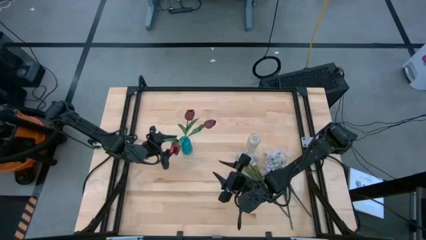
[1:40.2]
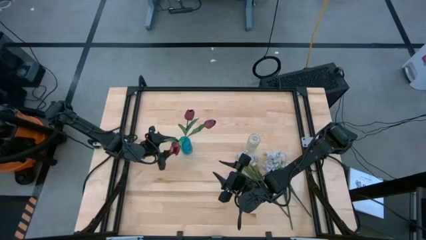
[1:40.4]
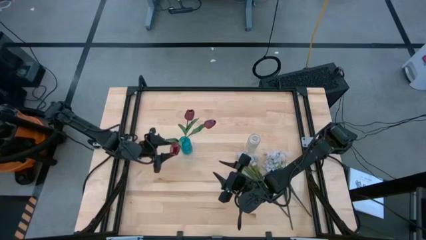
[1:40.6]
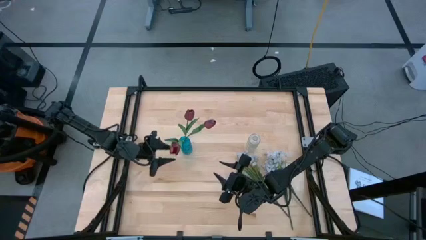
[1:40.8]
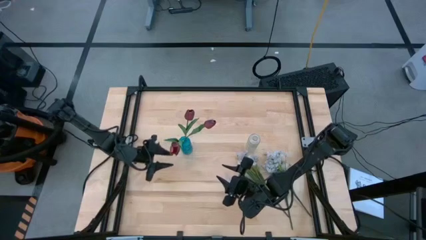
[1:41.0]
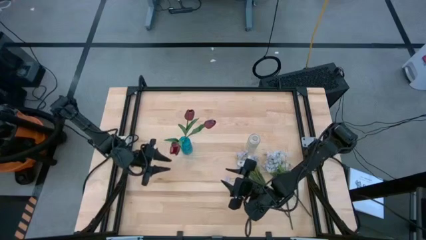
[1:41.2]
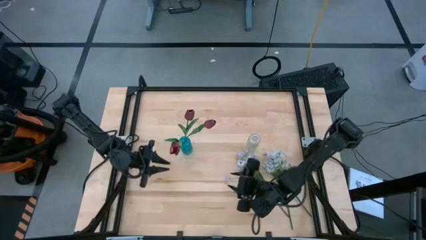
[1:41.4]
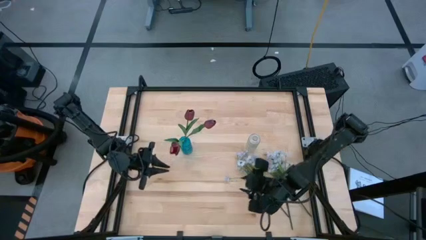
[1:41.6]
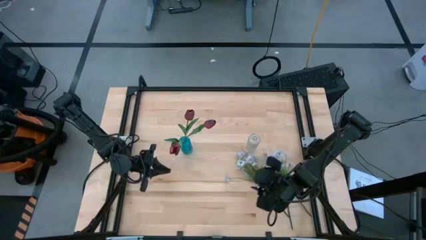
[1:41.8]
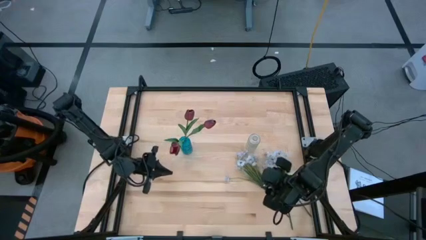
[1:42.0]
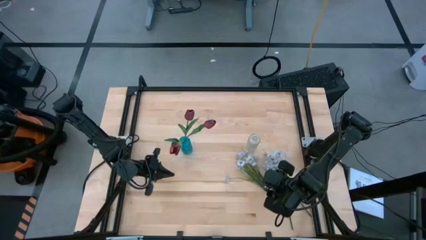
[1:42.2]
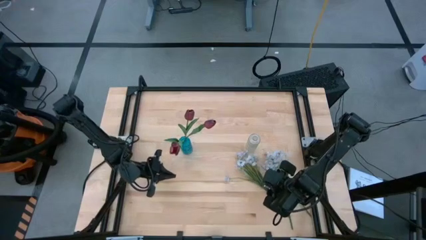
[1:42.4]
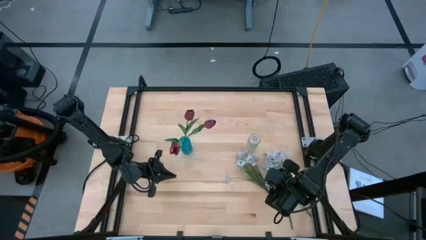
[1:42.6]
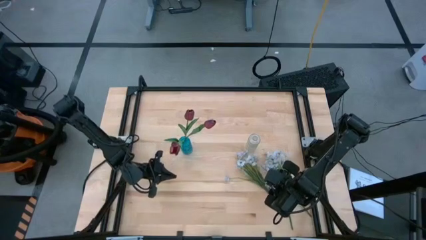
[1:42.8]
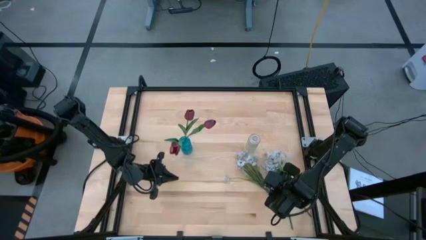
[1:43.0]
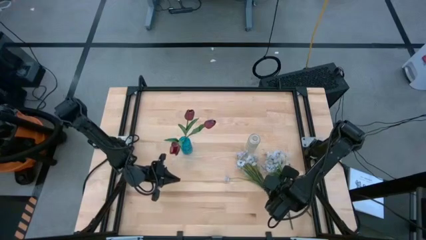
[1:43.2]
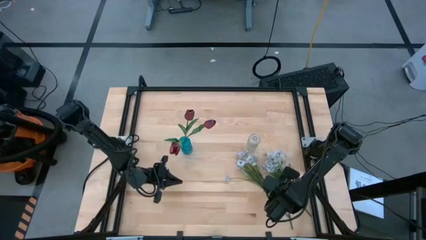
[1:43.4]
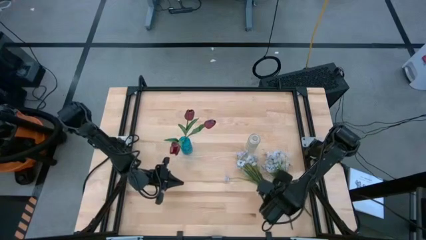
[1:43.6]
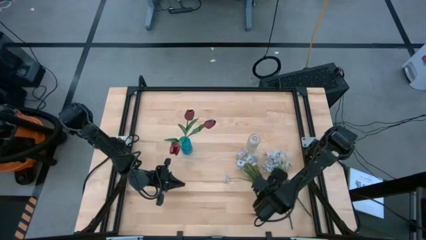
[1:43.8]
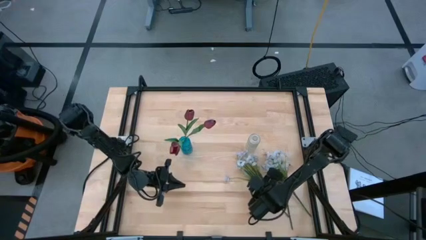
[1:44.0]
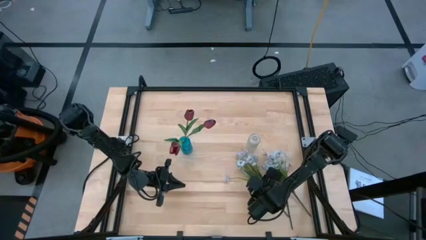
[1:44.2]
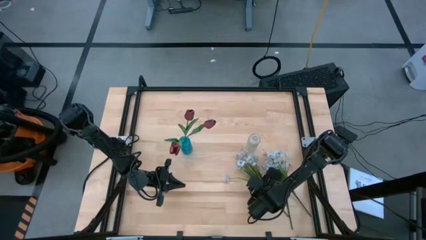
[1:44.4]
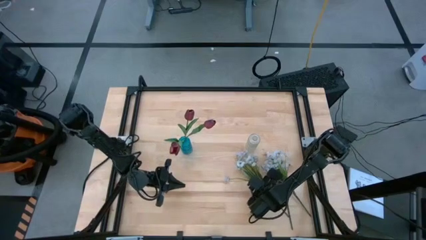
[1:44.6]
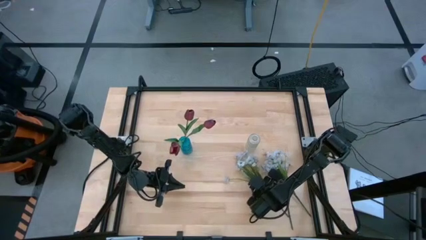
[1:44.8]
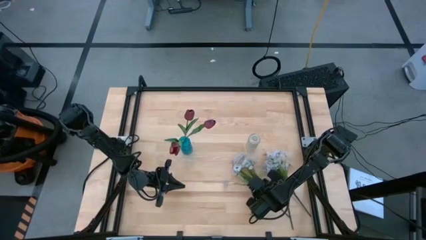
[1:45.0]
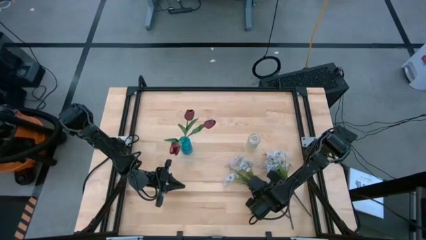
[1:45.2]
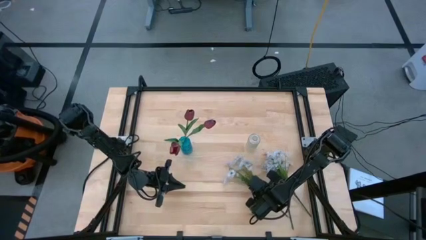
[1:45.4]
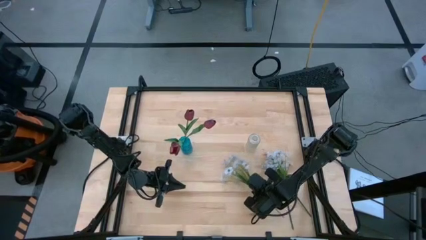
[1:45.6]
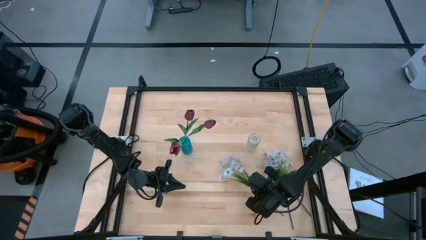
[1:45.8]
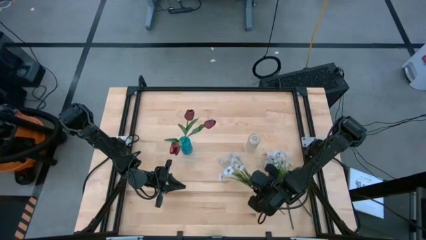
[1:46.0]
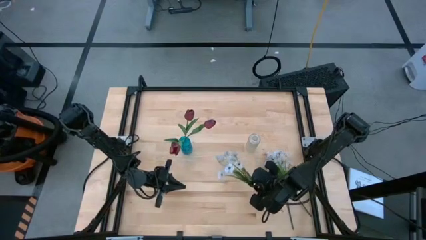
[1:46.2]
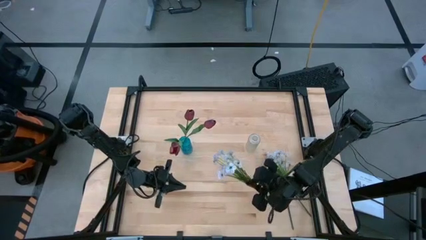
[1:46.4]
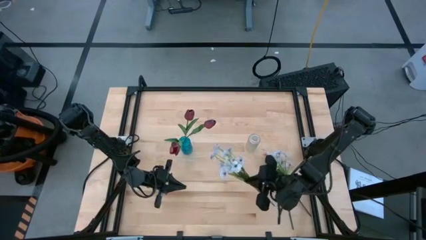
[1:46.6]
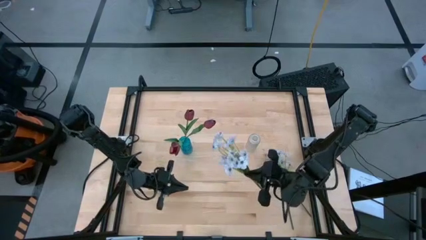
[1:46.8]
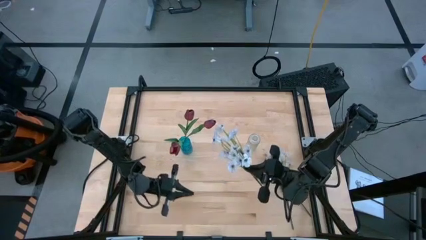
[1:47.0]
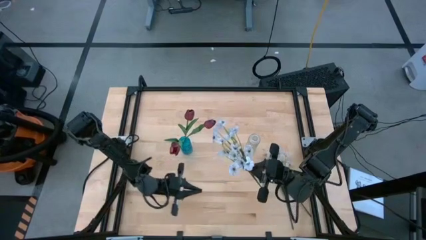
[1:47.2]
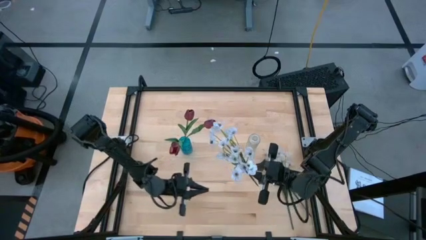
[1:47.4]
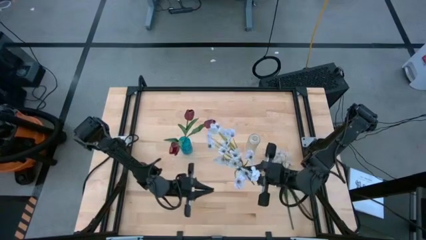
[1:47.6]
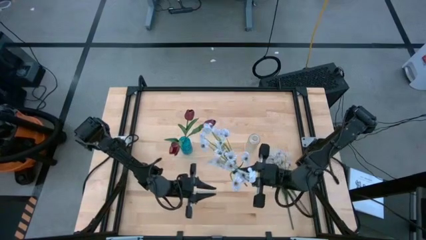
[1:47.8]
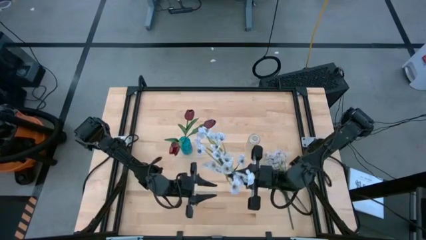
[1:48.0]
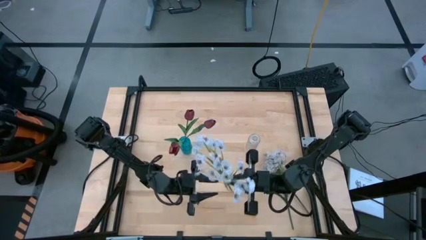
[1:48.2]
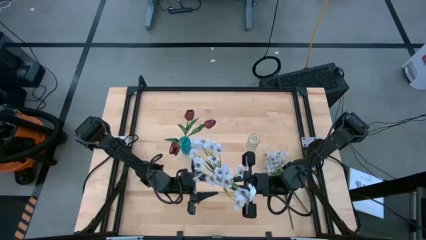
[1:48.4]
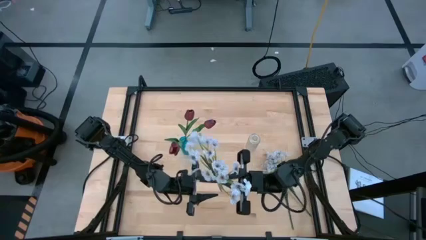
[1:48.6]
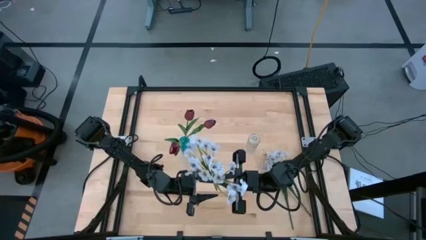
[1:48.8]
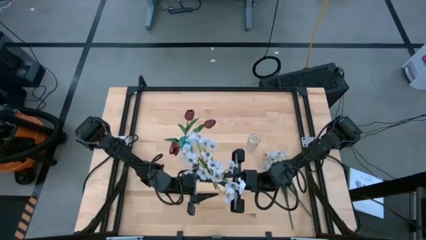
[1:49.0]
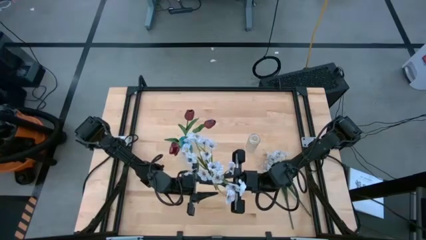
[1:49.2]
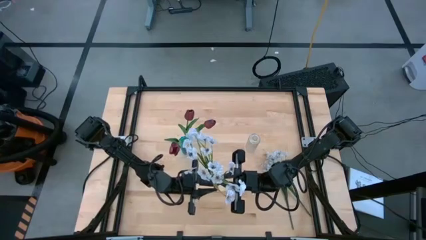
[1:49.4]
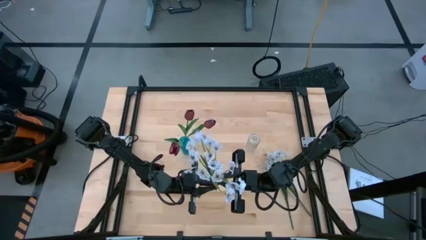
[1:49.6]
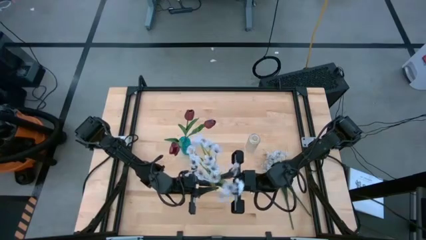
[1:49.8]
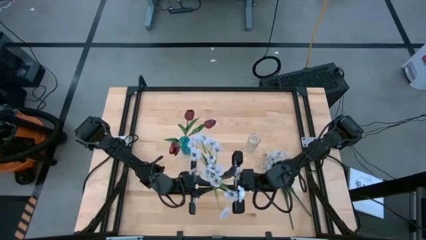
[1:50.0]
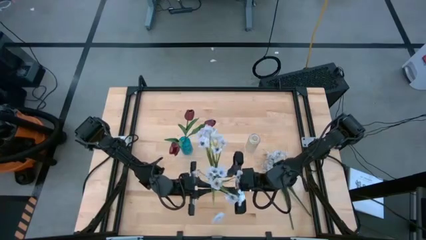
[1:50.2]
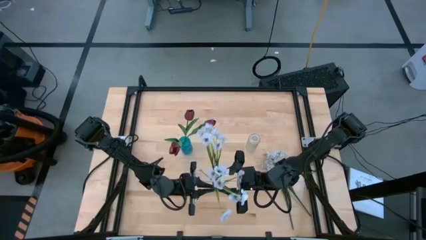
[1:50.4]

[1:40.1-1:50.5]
Task: Sort flowers into vase by color
Put the left daisies into the transparent vase

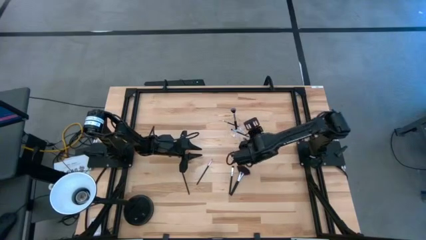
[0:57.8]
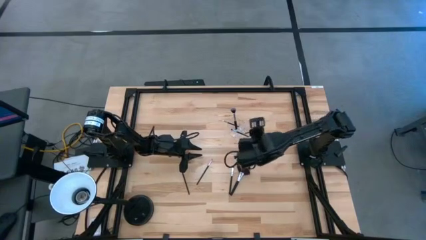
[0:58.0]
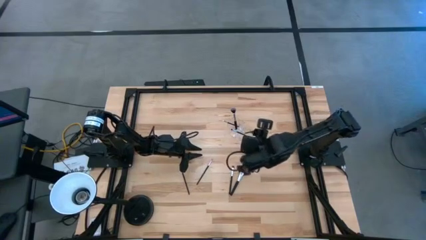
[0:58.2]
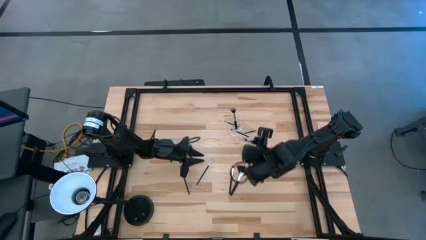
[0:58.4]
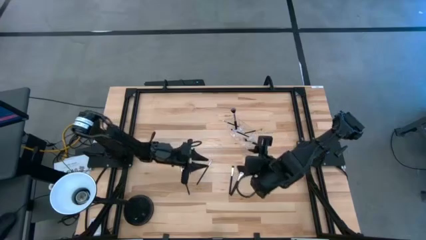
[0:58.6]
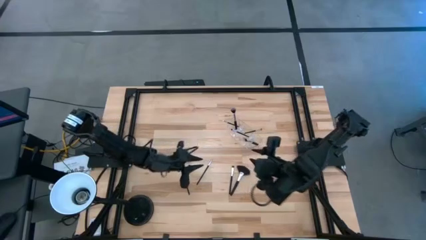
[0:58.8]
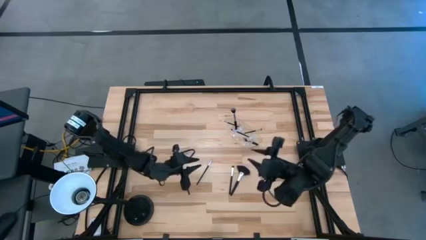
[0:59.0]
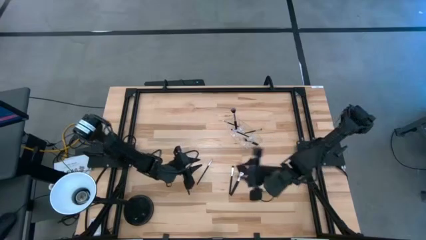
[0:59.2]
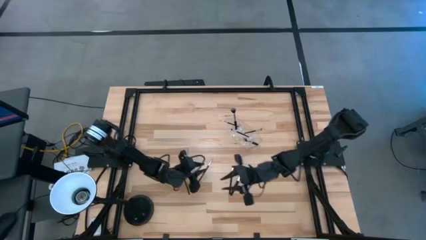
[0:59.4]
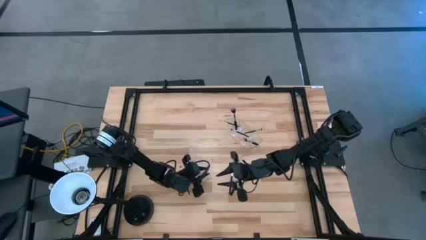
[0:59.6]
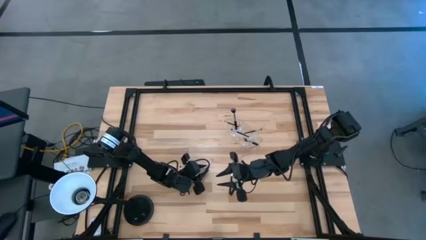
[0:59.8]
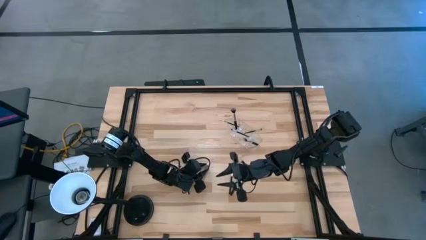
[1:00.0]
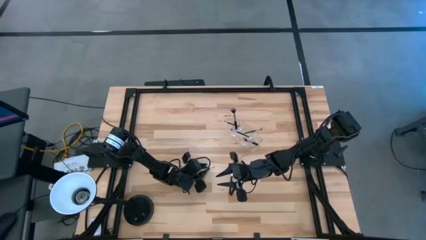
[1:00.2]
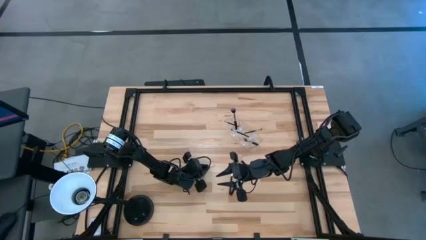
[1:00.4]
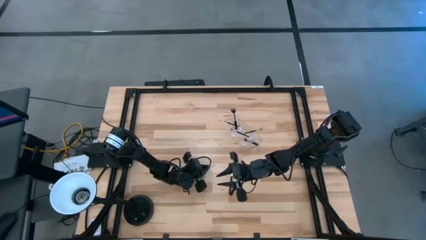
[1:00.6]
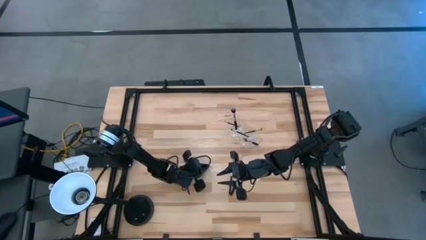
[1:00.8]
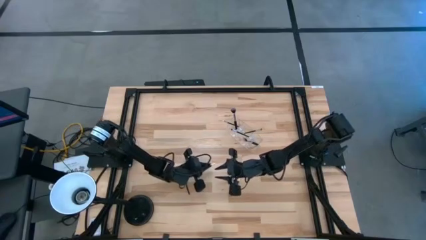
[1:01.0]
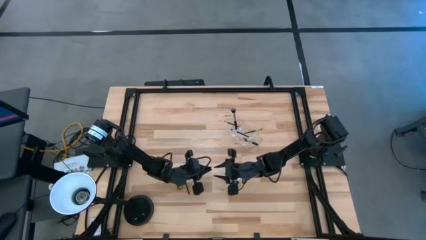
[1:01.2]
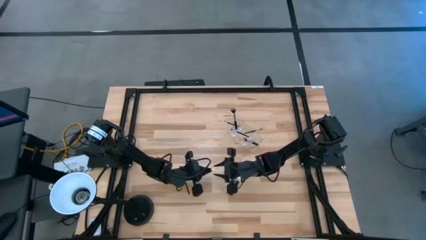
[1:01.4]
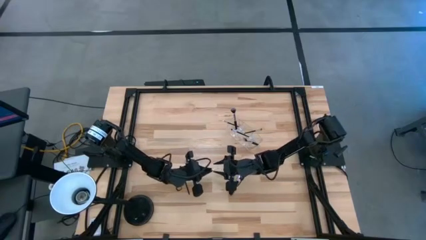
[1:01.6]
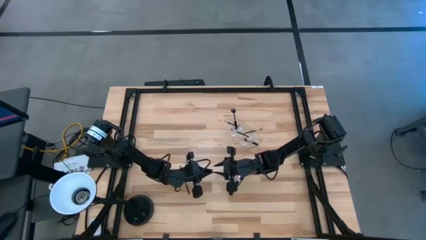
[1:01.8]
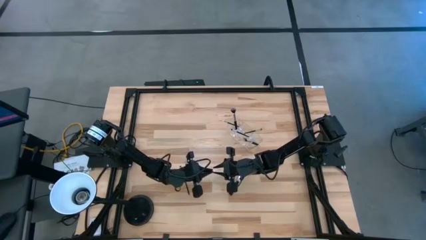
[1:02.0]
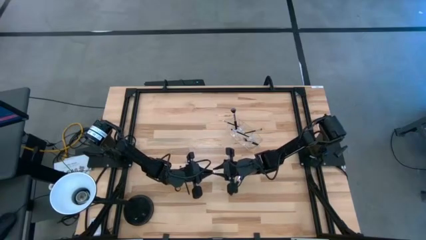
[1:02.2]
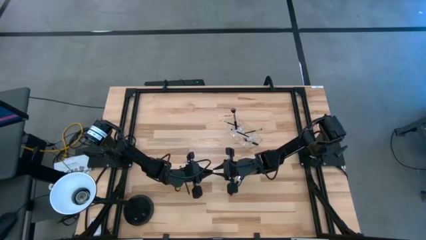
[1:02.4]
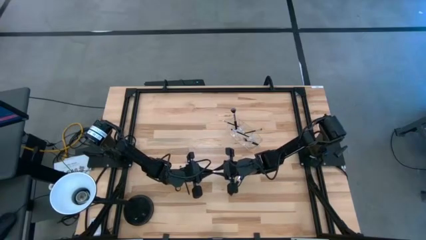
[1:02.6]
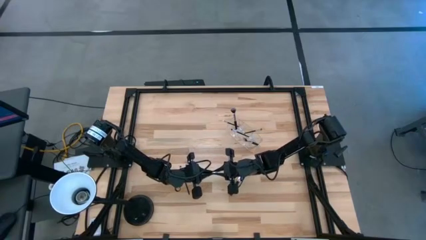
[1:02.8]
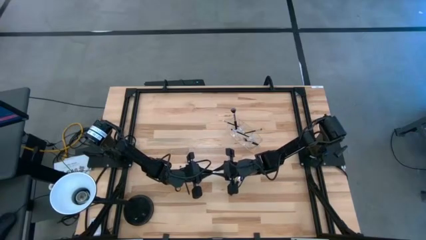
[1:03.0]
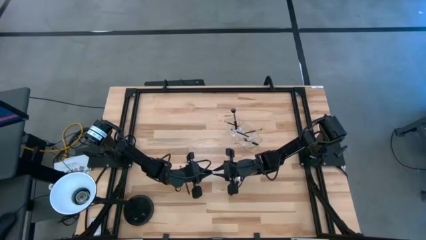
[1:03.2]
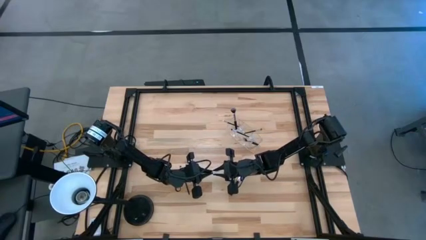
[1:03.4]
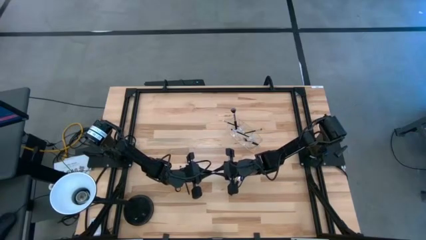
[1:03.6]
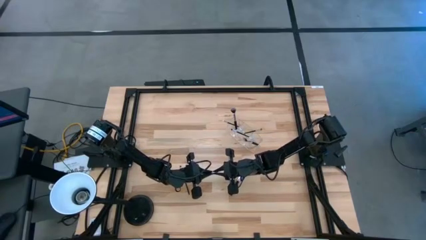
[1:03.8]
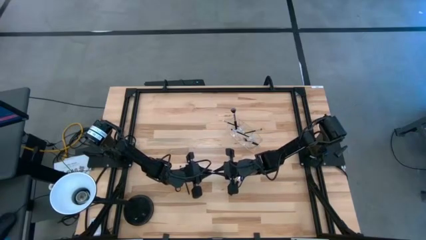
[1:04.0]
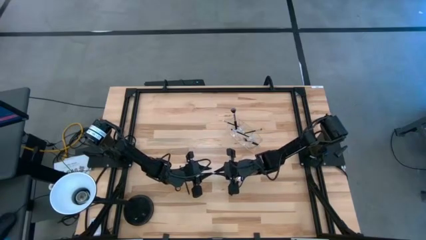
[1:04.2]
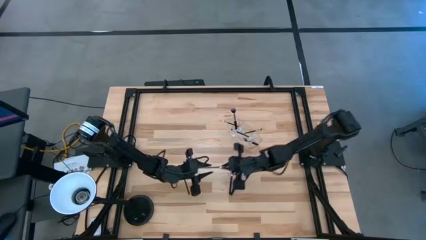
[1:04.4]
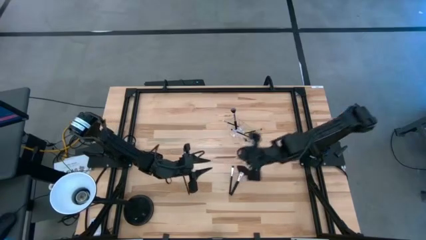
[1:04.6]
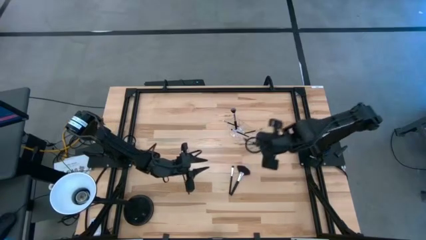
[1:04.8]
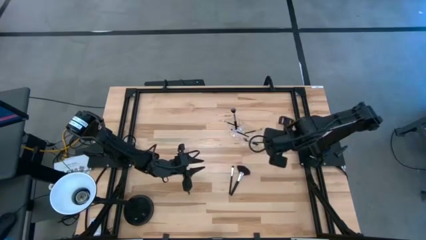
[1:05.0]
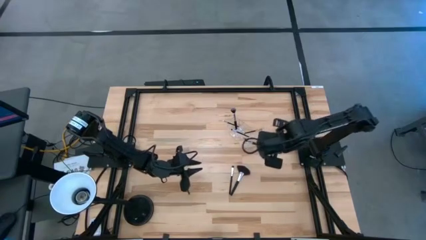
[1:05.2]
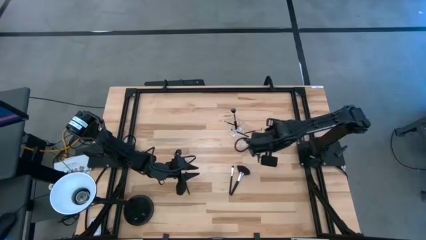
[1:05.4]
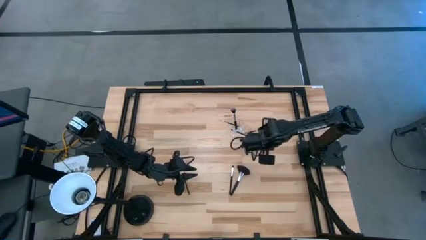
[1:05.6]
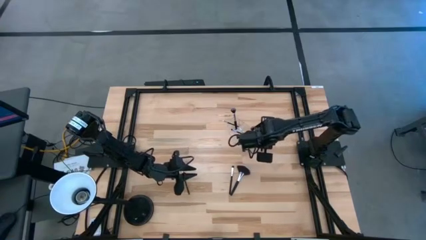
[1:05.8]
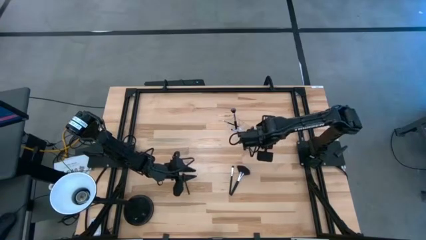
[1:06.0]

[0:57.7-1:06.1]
Task: Put items in baskets/containers
Put the liner brush into the transparent organizer
